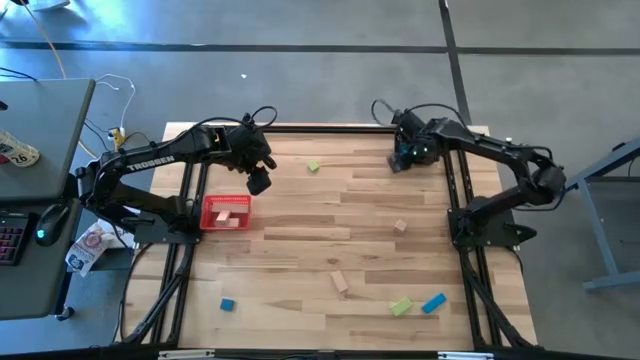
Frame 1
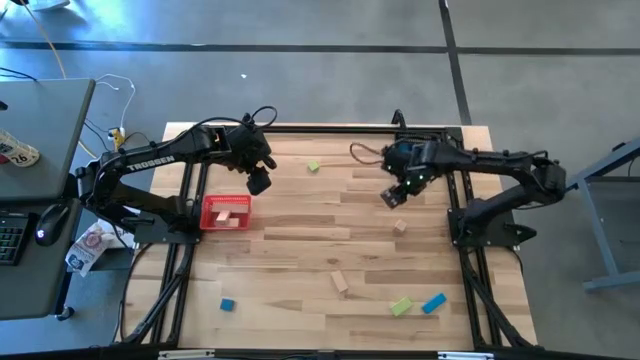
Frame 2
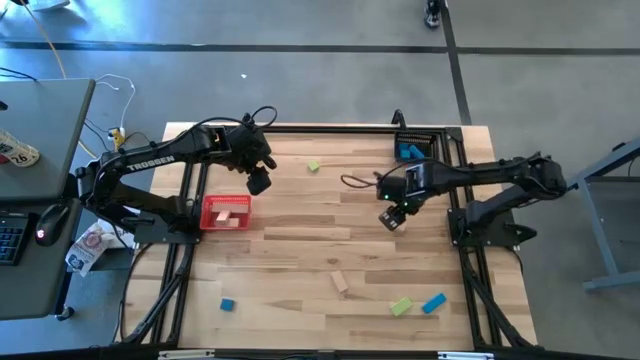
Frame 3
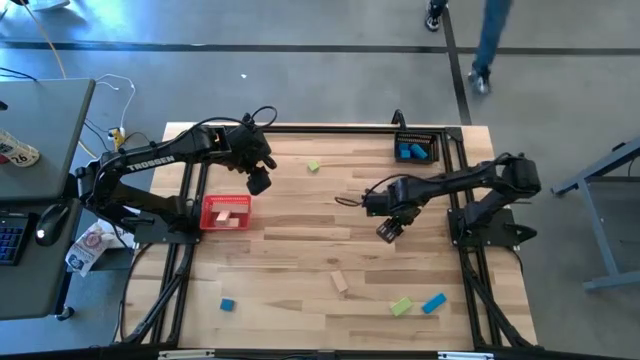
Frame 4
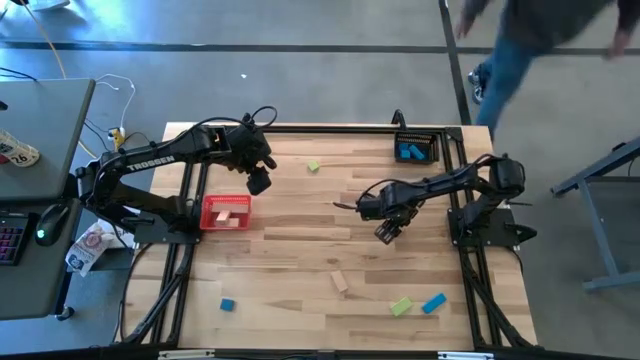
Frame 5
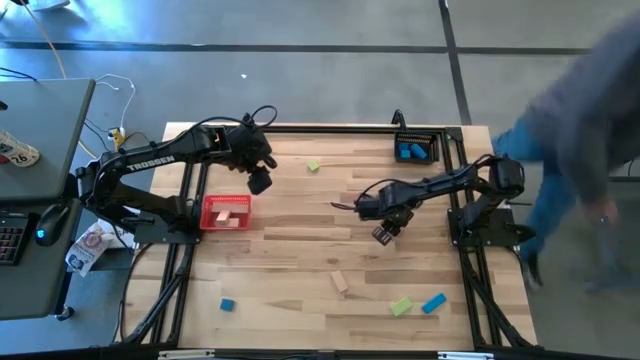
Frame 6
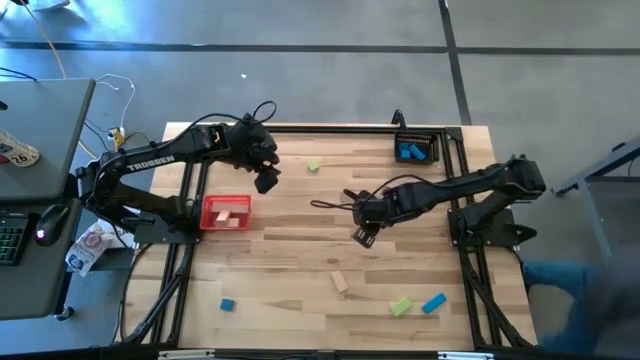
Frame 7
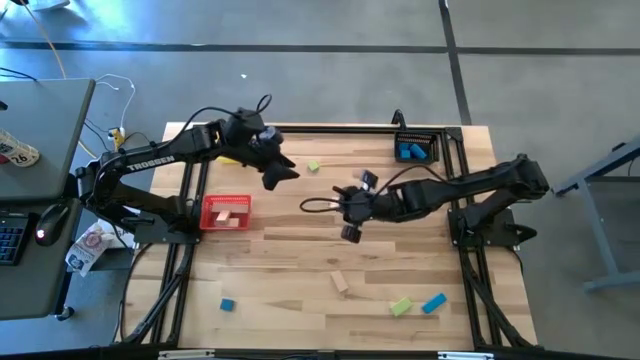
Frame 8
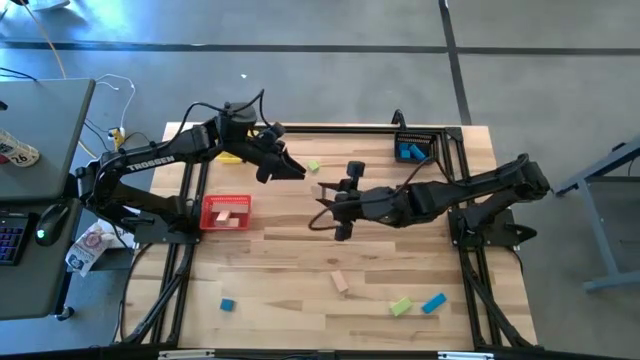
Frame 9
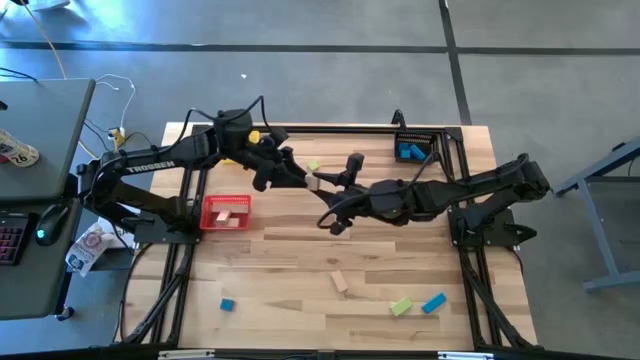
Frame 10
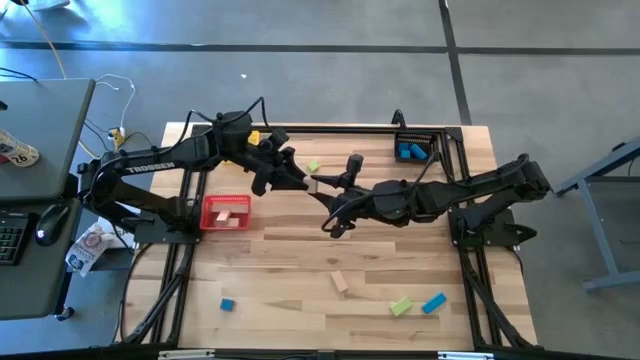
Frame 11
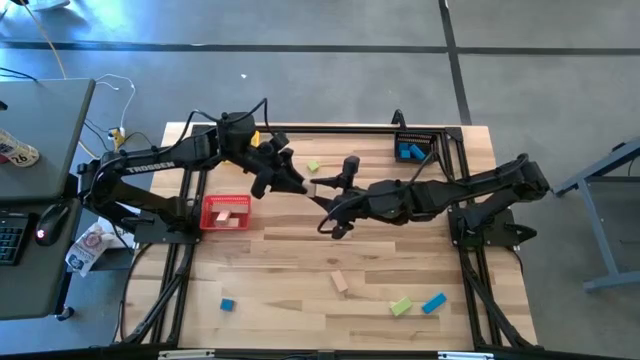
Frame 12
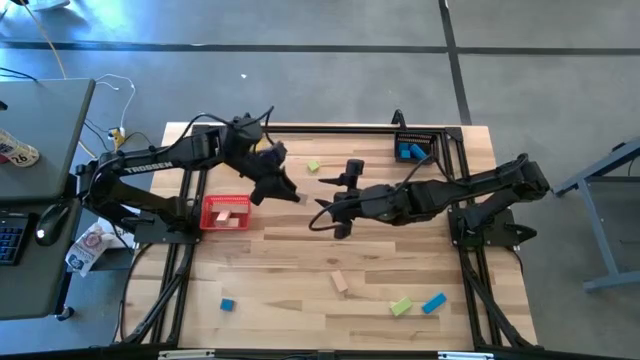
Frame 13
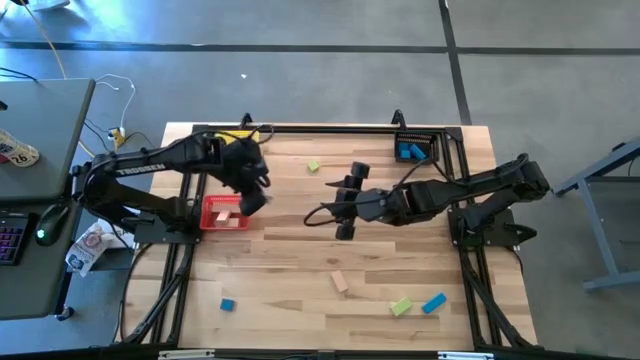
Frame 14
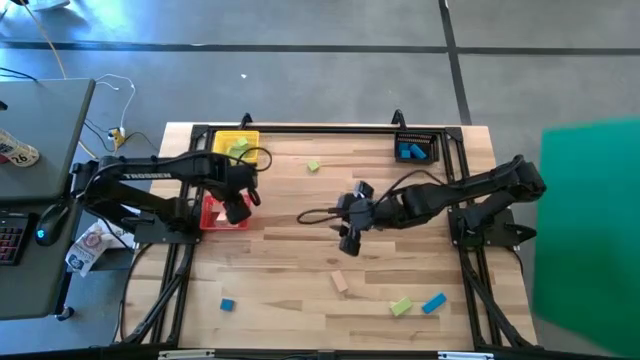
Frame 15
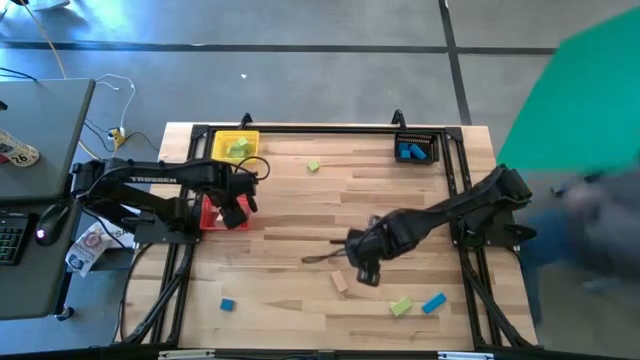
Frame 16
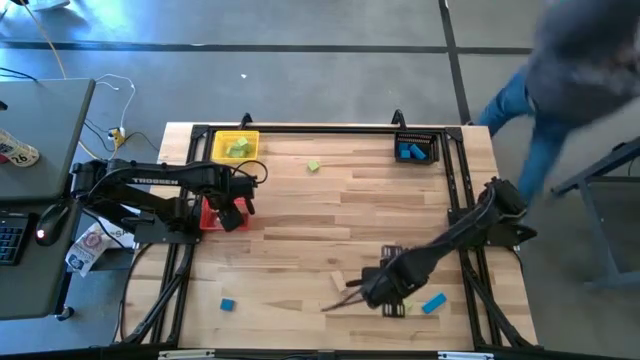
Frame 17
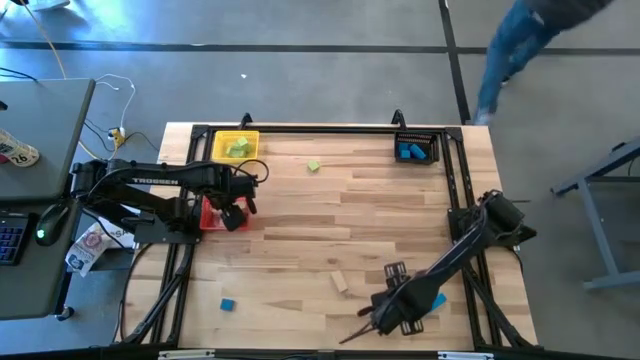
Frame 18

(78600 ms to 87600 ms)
Task: Sort & place blocks by color
Put the brown block into the red bin

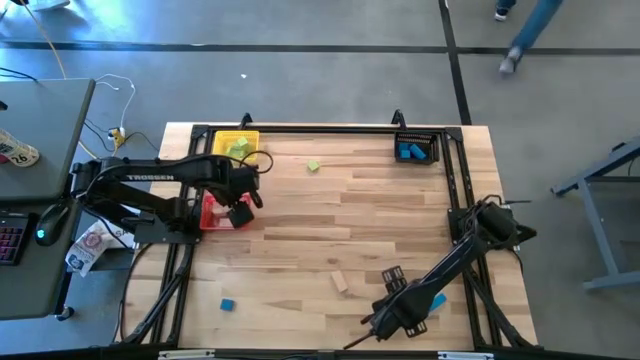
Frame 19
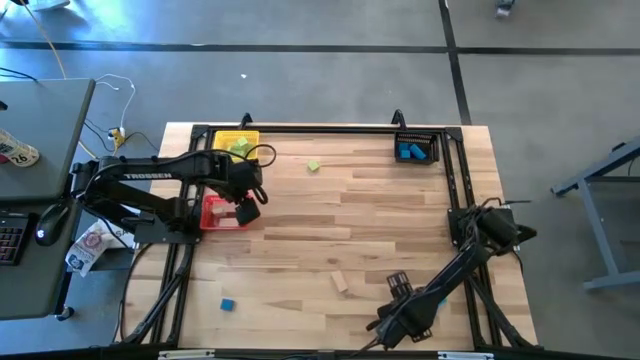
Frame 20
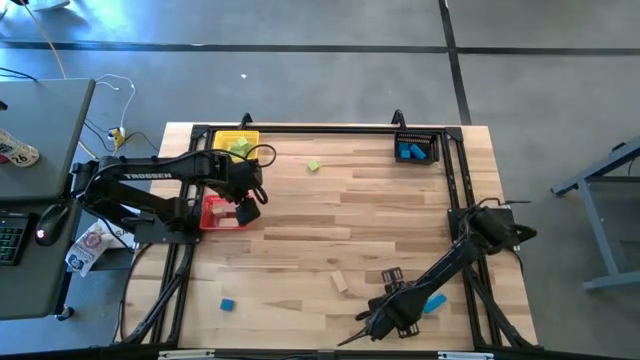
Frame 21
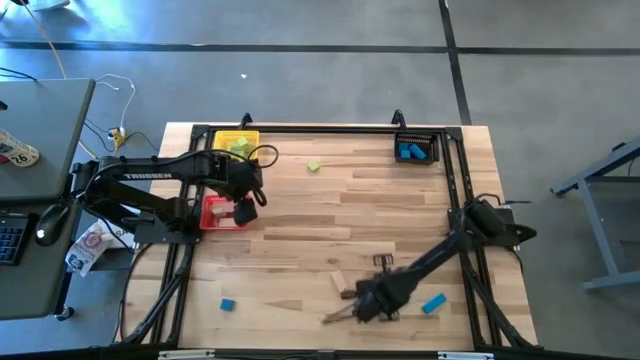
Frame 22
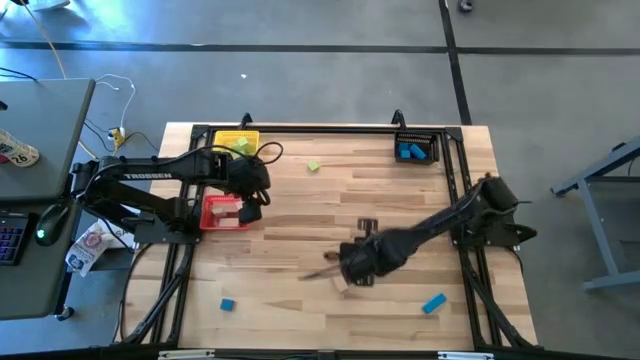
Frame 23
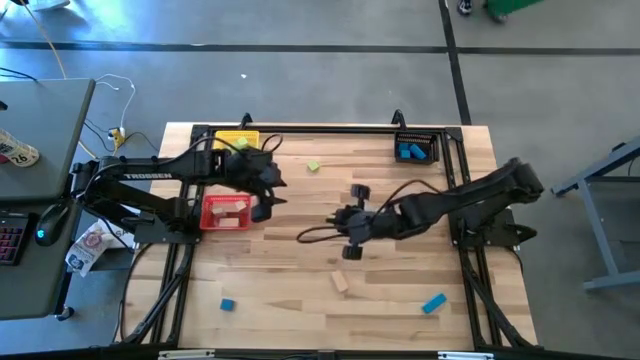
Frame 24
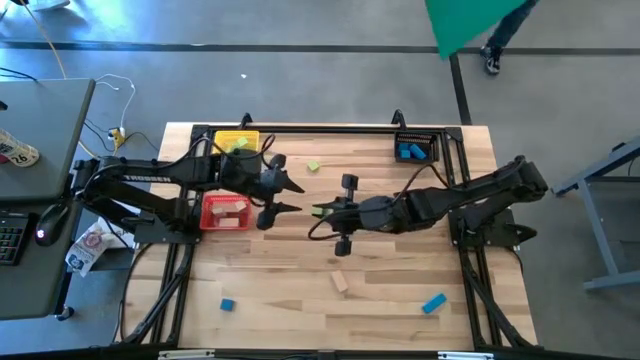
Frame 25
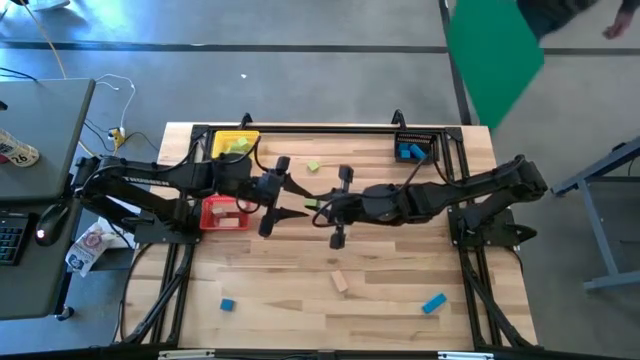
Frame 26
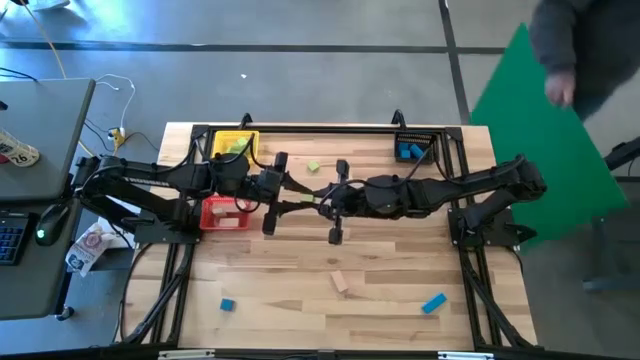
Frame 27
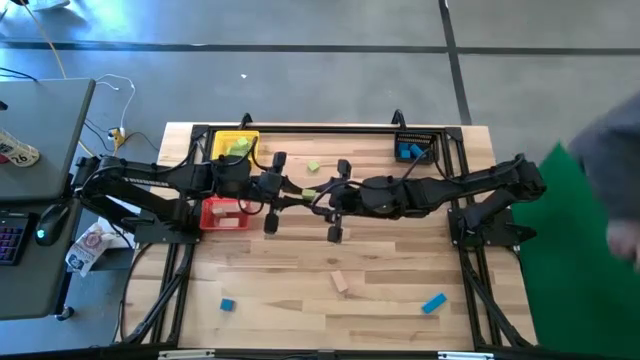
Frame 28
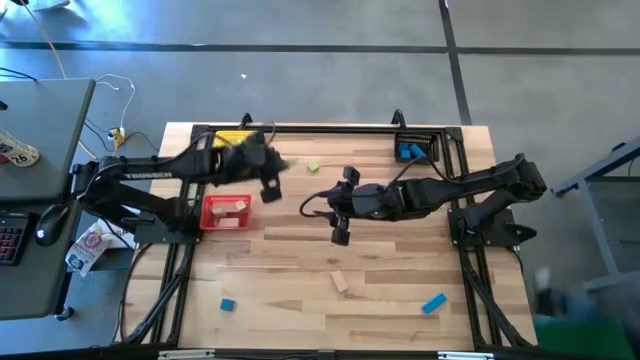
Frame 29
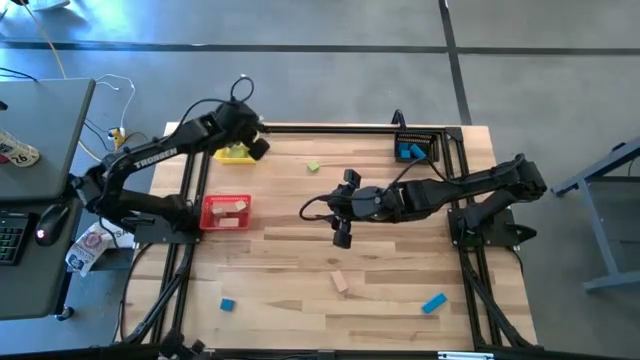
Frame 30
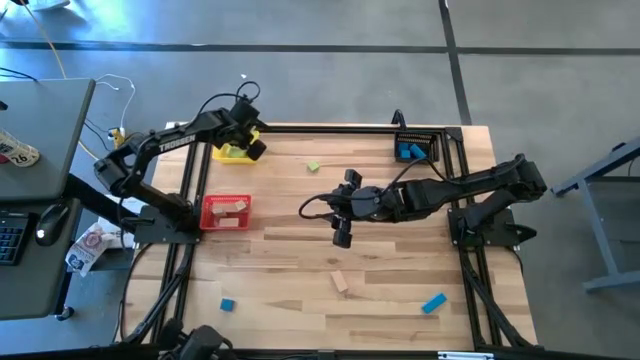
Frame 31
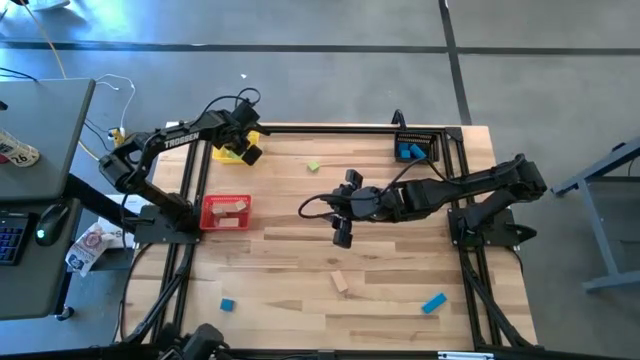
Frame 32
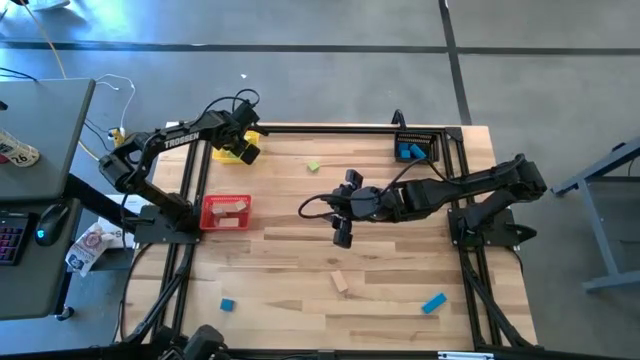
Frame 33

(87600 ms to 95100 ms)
Put the green block into the yellow bin

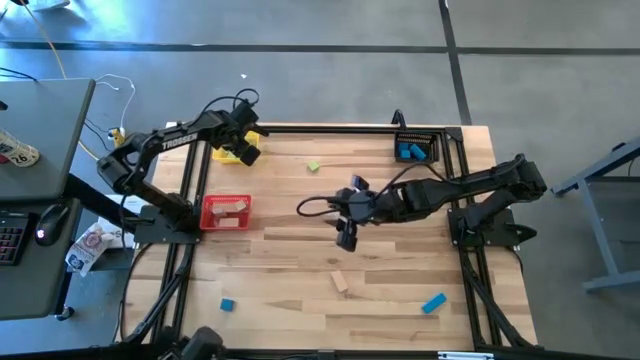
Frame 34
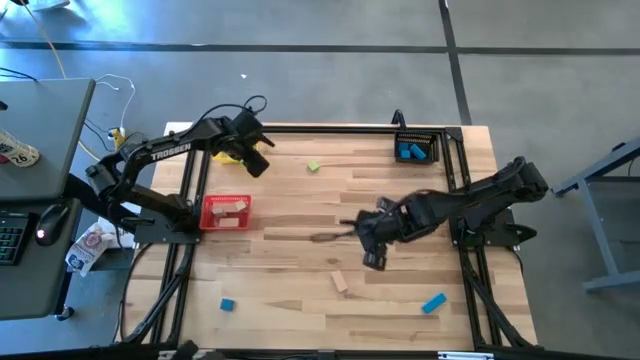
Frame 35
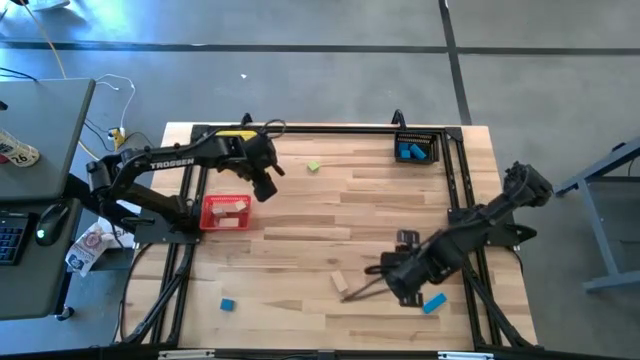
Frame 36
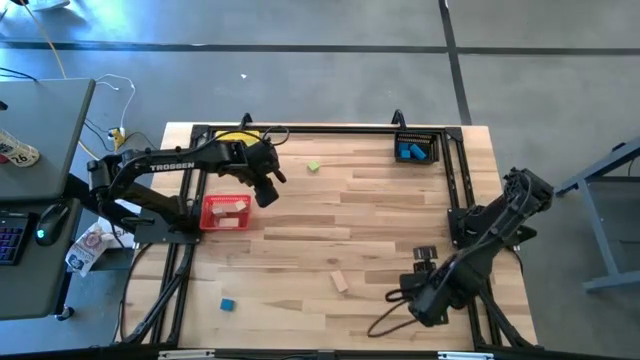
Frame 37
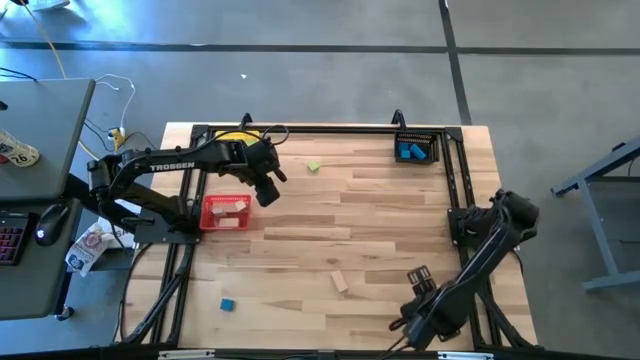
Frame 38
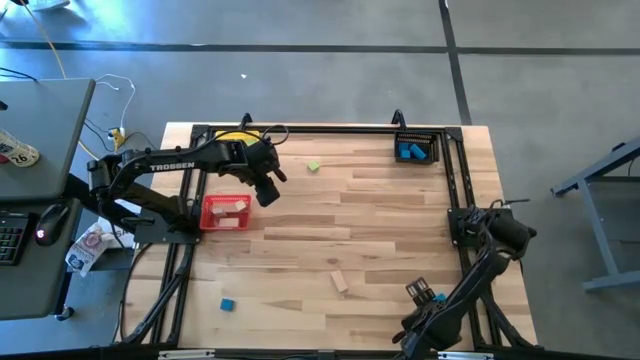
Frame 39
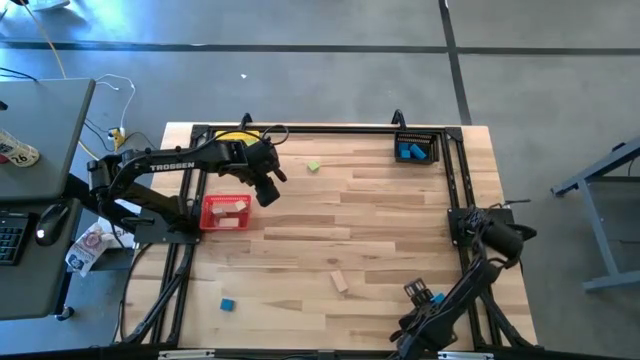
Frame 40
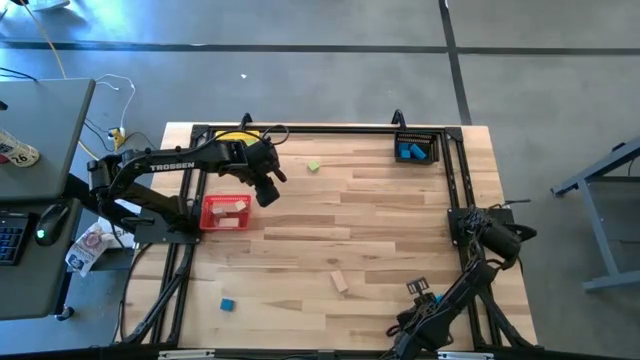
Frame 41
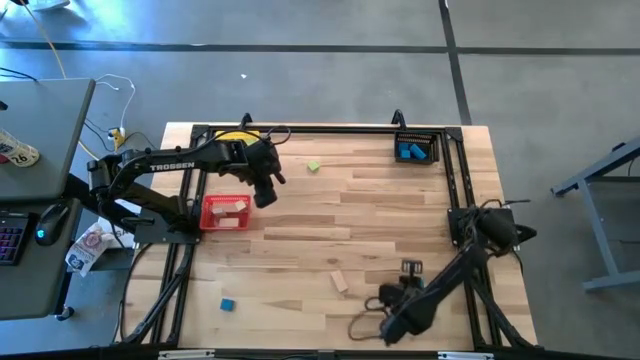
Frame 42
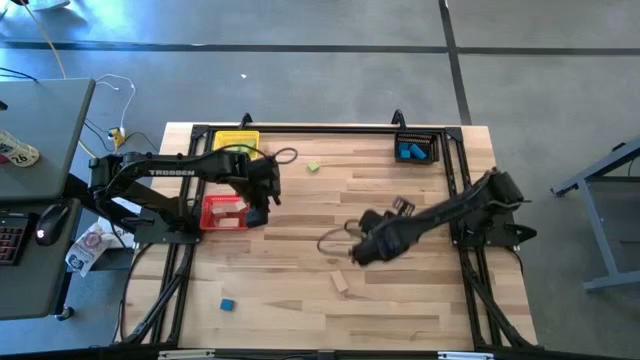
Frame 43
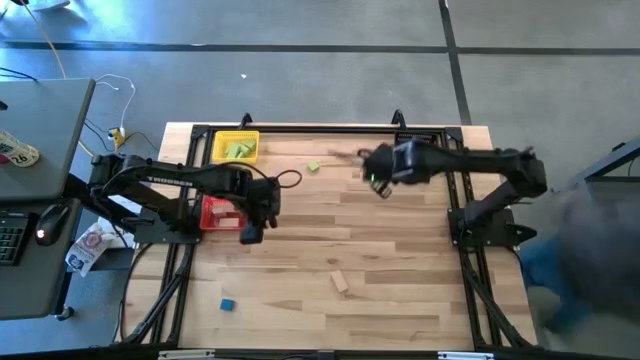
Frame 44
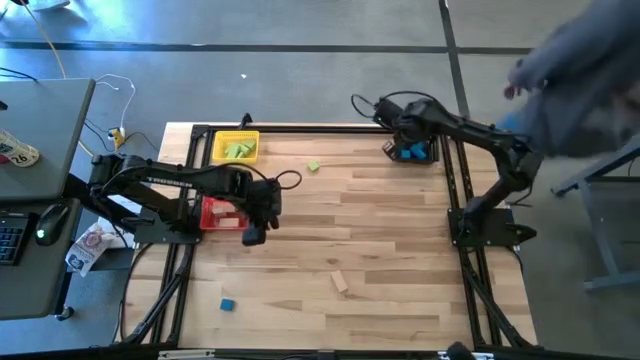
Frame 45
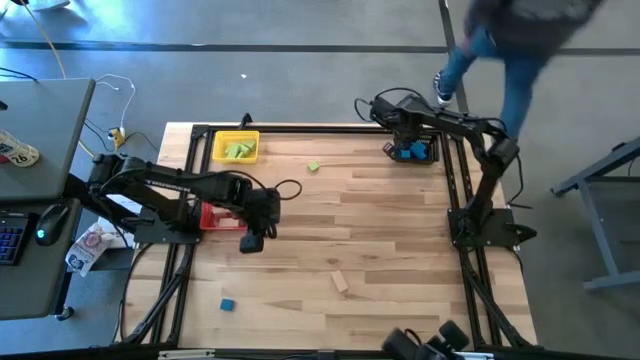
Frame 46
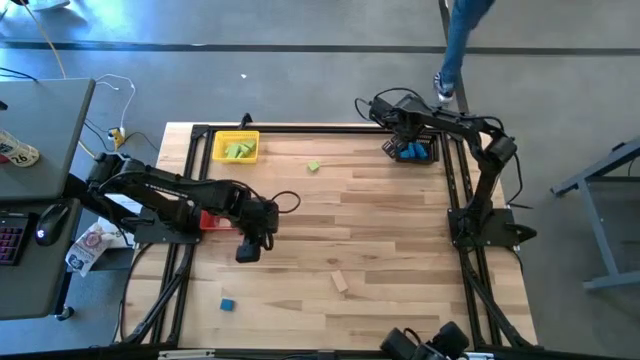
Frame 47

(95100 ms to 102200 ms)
Put the blue block into the black bin
